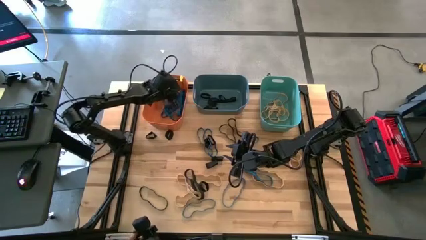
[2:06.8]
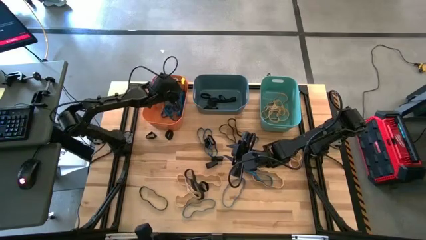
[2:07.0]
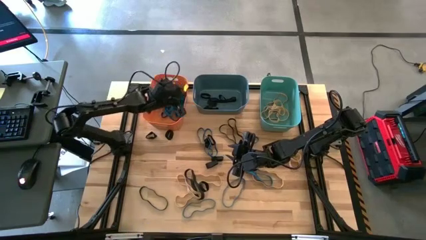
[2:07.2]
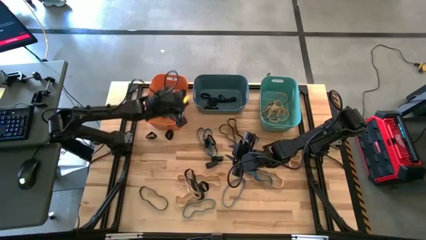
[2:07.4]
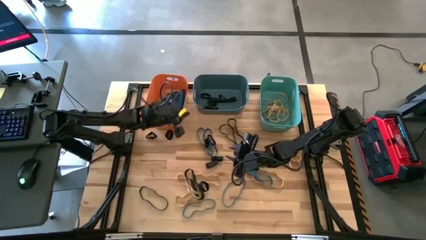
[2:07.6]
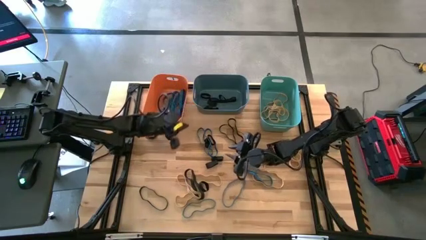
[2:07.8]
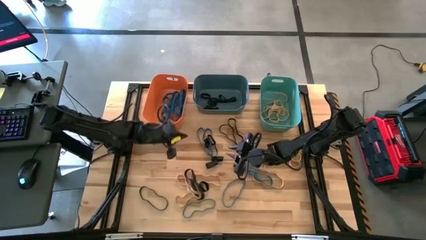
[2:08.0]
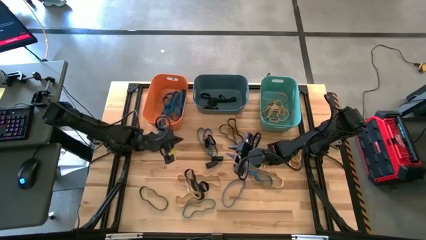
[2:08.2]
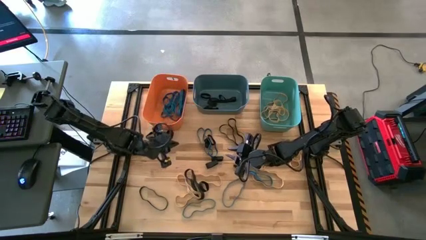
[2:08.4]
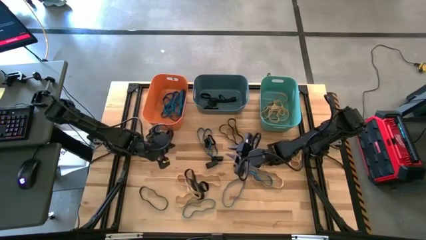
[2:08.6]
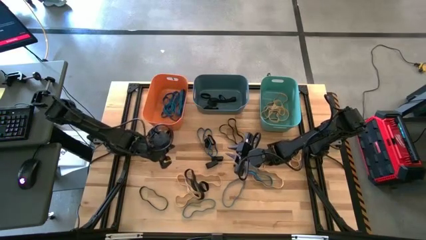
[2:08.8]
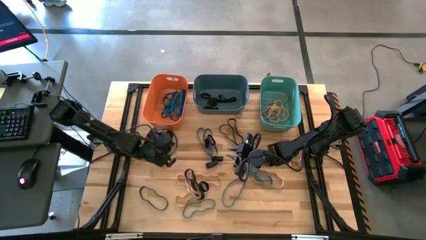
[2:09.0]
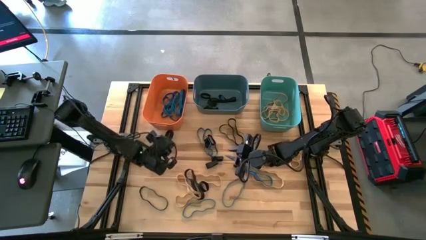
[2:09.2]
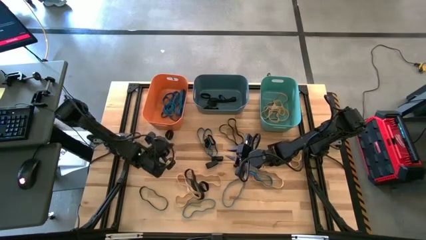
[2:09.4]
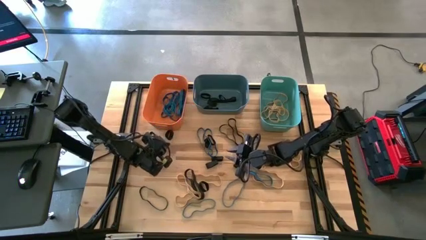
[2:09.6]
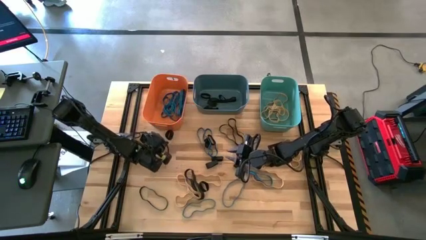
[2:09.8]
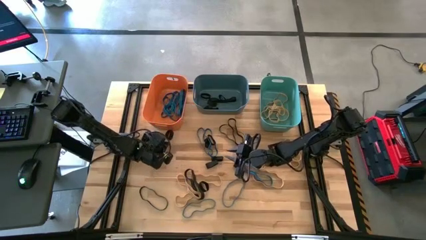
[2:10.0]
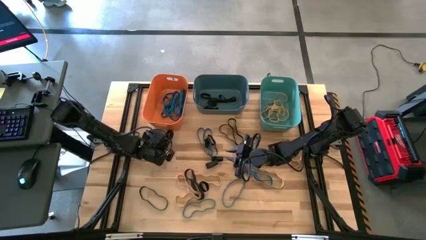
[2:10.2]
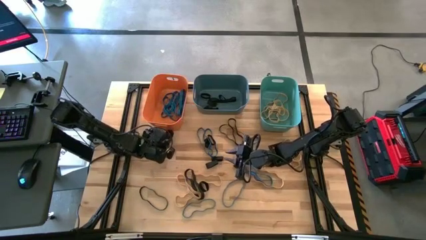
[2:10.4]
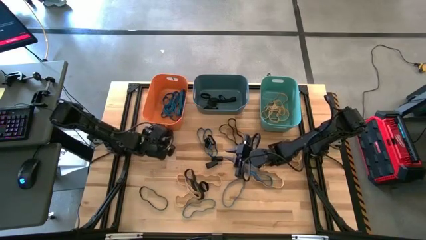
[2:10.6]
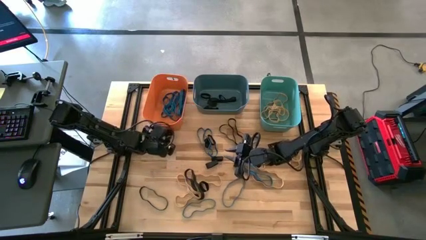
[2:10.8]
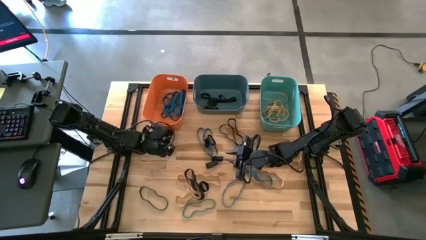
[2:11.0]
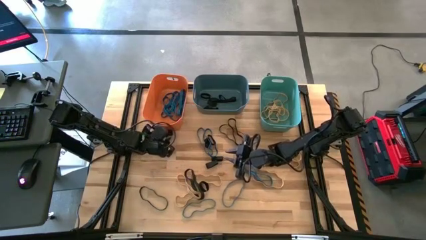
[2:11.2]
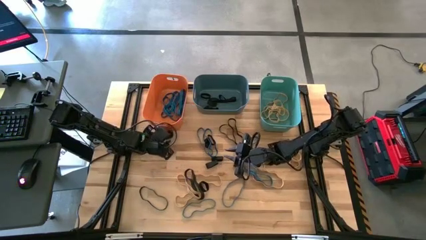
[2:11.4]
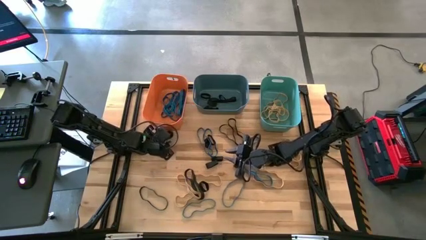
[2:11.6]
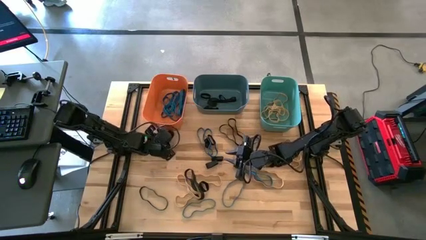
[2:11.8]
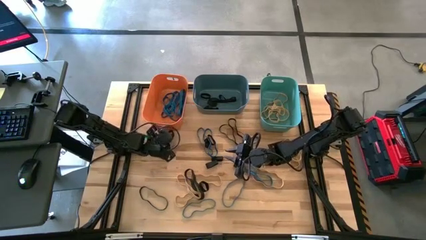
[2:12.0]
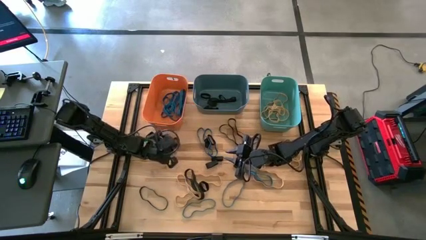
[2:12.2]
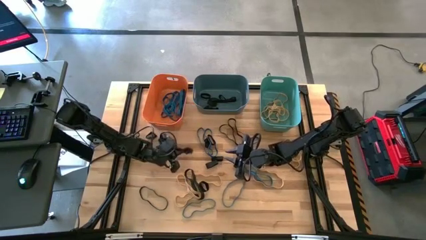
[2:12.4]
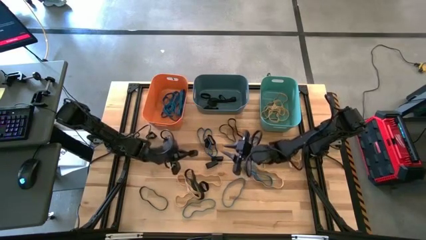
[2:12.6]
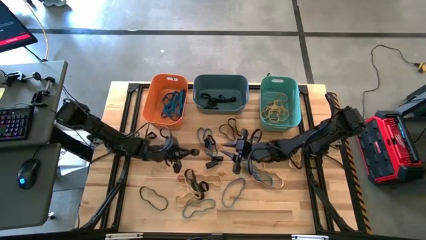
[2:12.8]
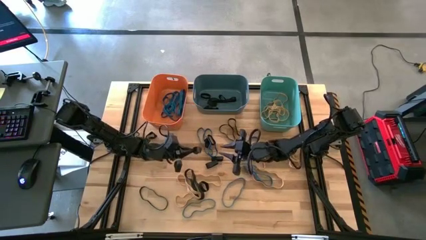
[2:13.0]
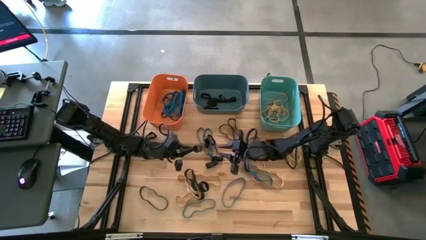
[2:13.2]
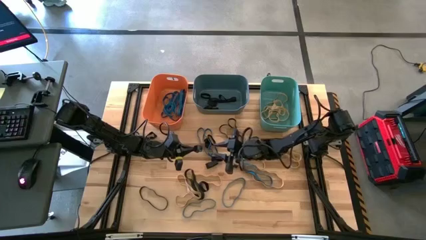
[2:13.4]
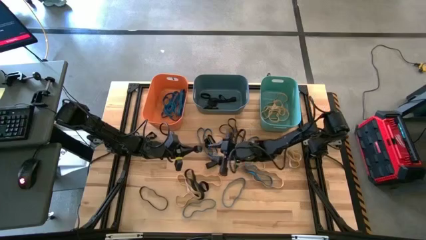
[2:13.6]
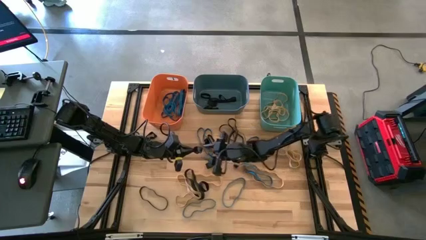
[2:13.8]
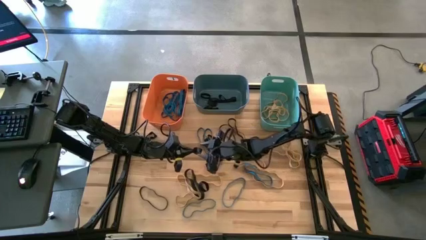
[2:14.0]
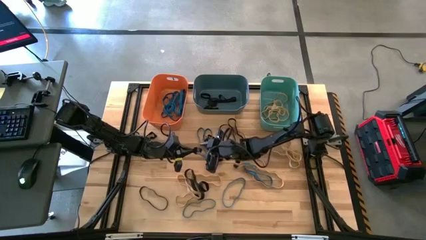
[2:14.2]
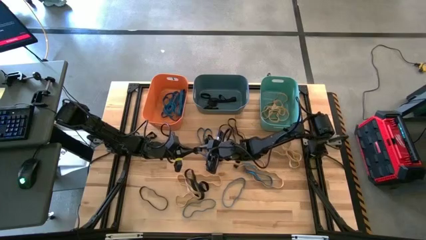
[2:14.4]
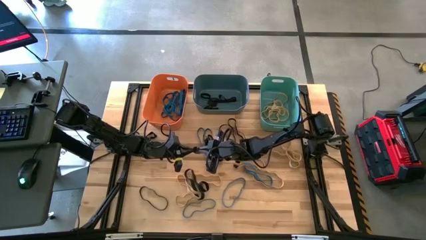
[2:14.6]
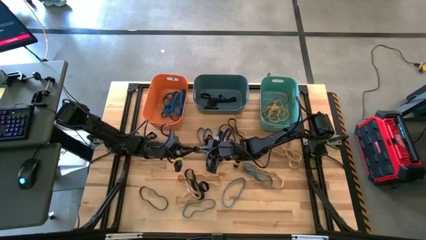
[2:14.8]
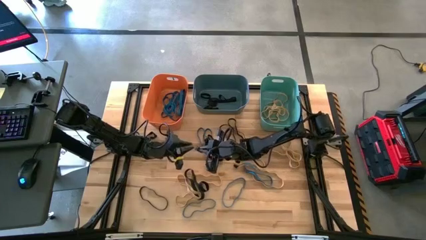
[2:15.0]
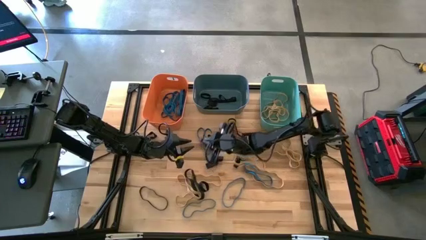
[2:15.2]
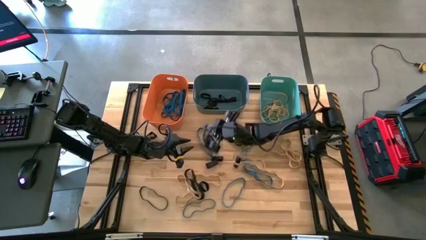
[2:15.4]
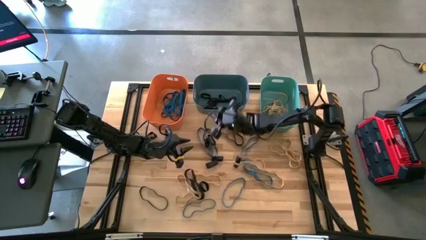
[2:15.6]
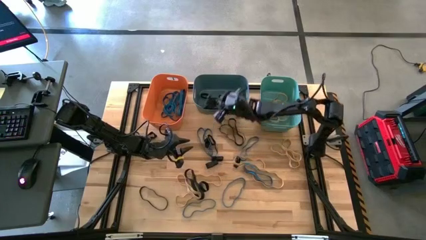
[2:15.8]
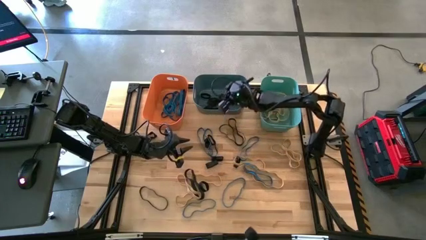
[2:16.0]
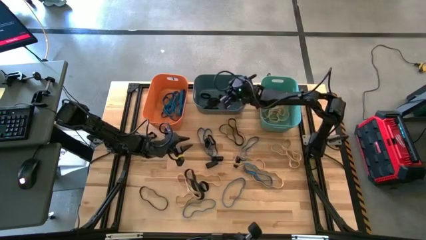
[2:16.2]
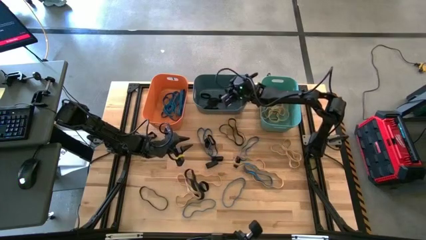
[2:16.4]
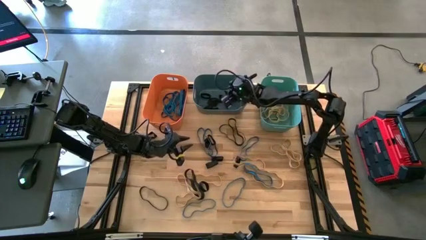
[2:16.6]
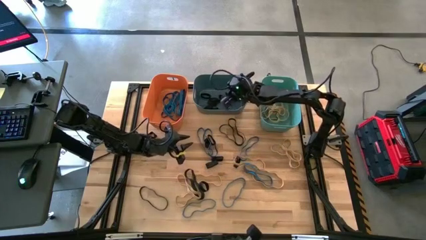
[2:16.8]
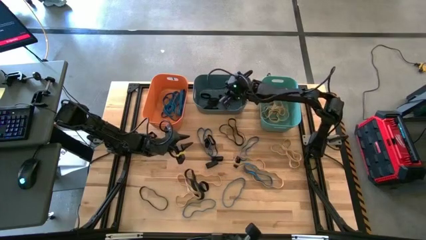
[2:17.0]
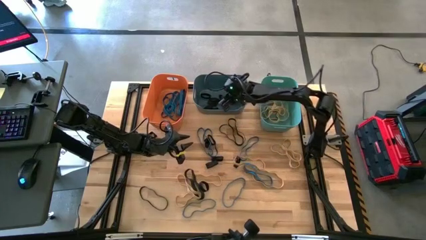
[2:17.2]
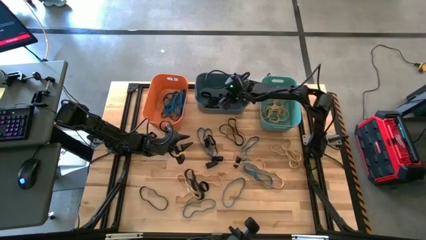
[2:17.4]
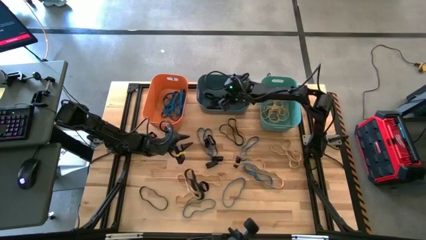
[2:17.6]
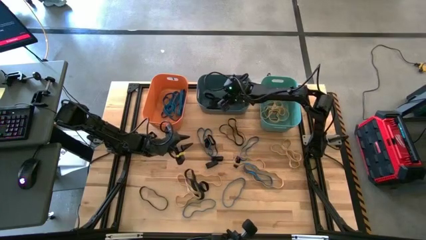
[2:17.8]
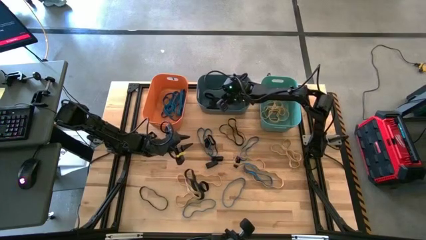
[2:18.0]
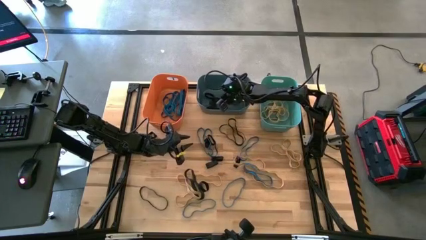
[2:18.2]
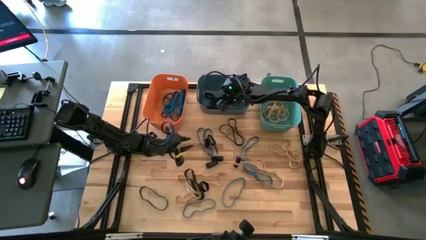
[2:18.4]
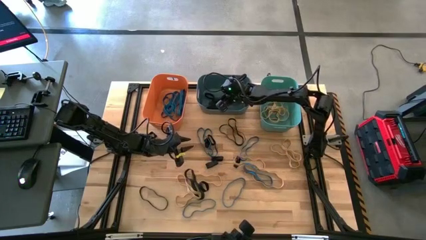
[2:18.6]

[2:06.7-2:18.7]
Task: Sort rubber bands into baskets
Put the black rubber band into the blue bin

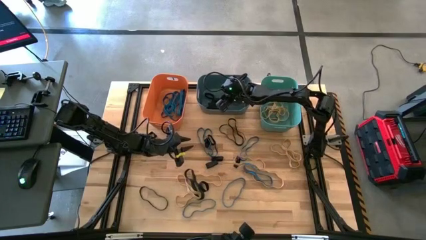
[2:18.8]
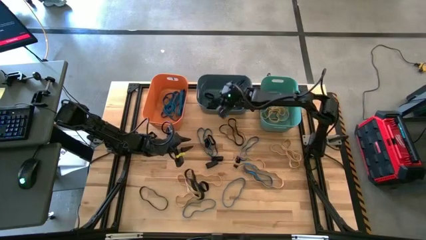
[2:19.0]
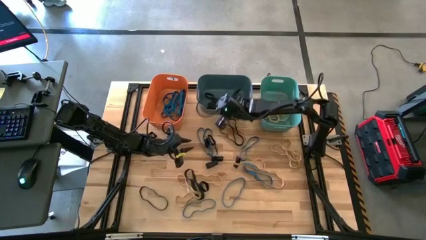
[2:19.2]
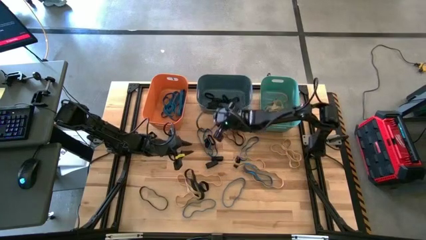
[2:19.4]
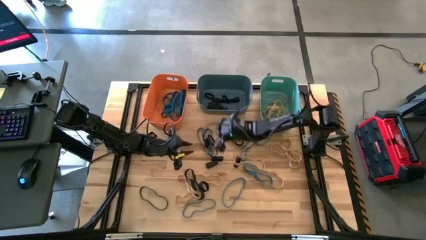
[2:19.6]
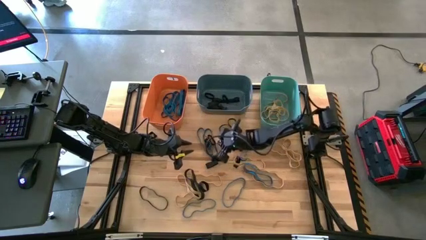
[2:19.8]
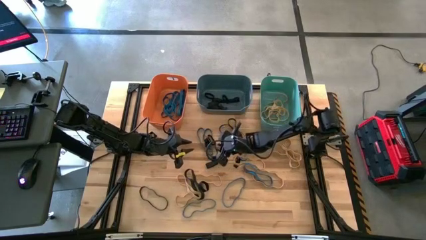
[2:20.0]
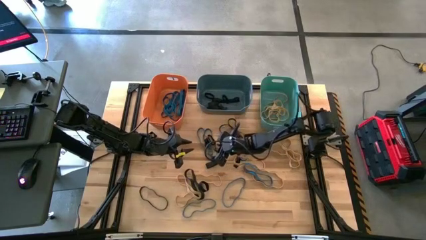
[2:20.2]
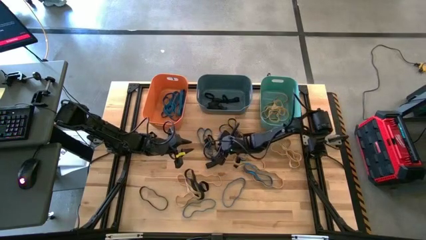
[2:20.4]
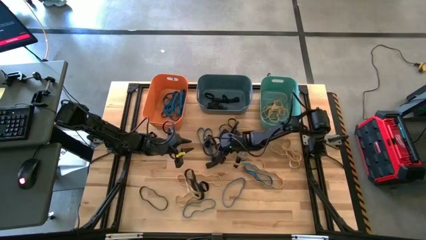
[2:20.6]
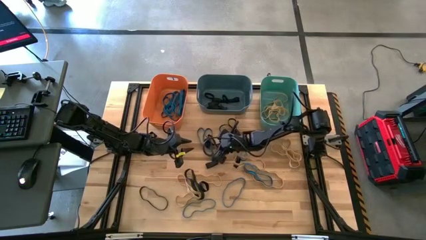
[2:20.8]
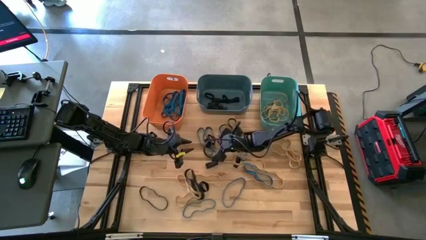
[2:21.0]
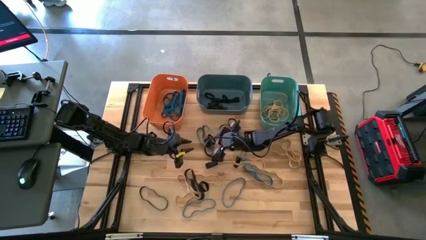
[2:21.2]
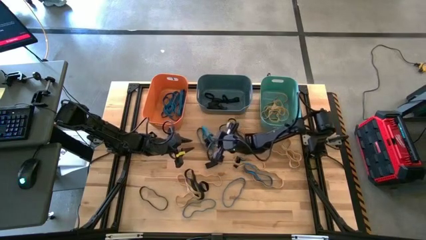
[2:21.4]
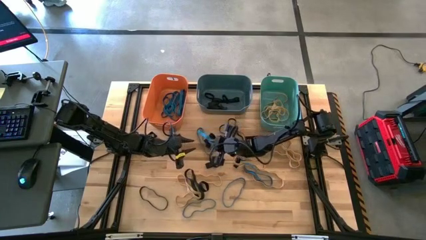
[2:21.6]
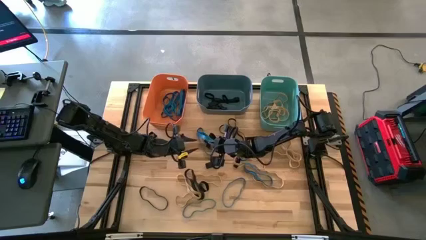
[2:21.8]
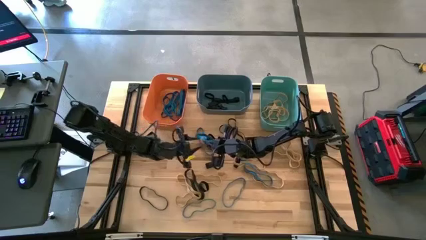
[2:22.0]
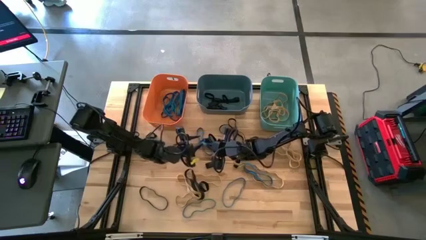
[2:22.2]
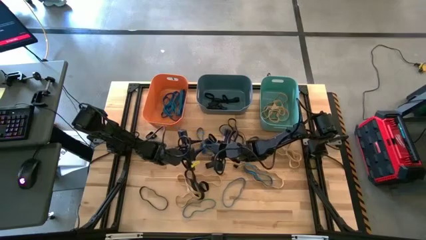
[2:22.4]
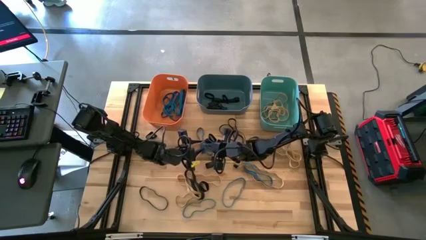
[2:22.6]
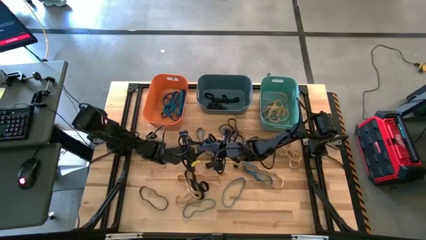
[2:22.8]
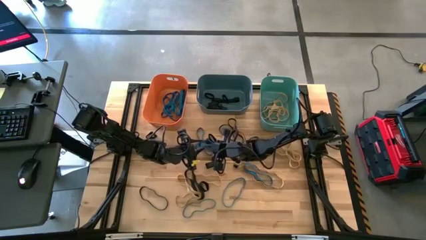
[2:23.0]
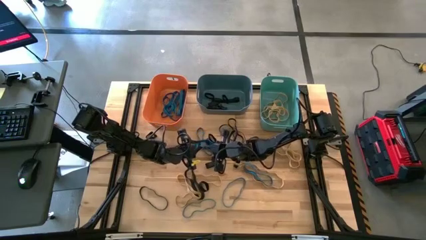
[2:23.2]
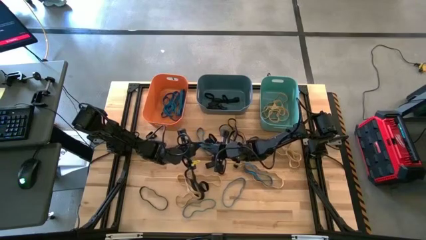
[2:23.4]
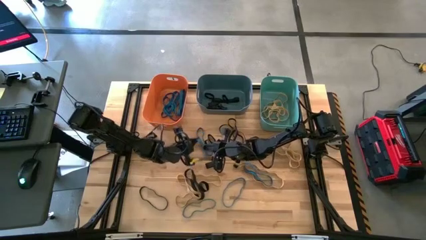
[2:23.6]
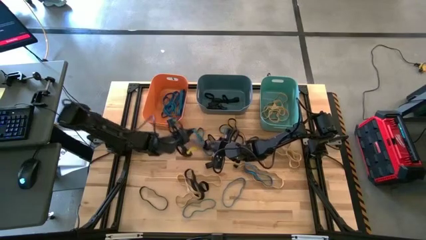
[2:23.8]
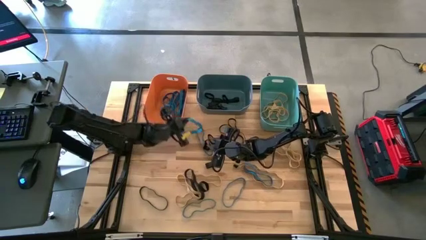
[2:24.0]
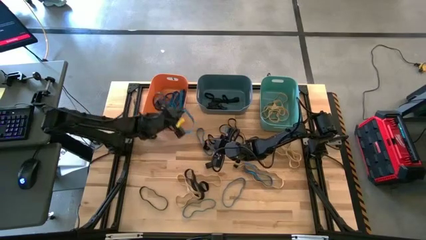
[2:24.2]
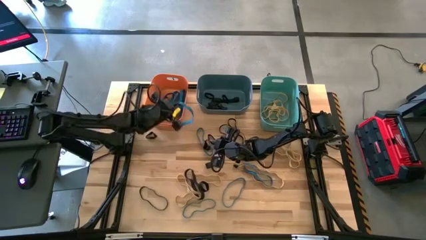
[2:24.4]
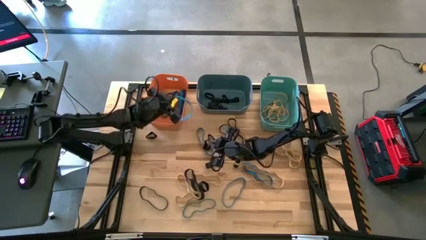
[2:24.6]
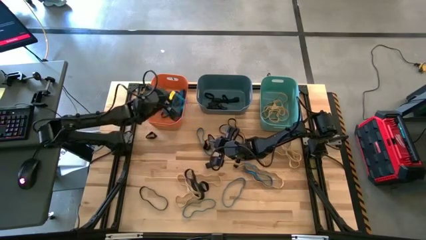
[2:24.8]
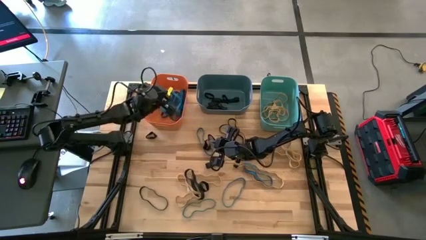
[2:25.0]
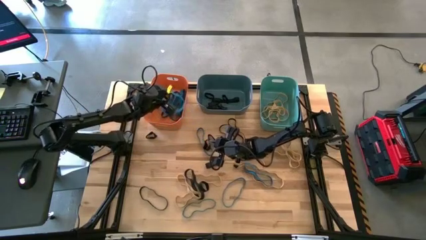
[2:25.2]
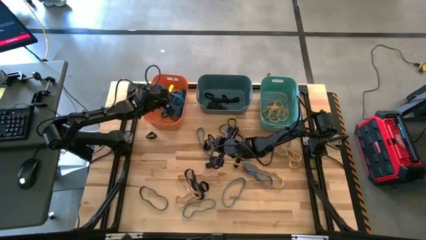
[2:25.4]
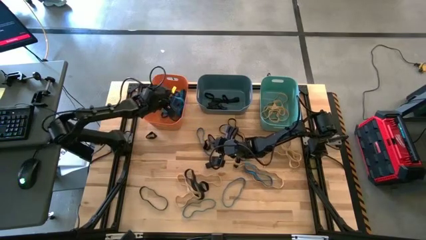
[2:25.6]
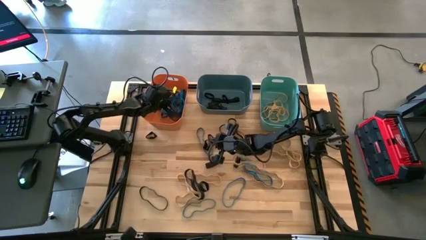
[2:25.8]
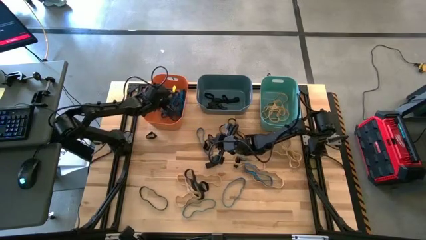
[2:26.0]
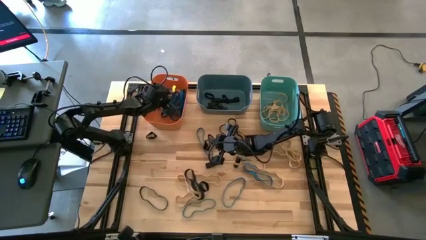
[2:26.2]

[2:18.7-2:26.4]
Put the blue rubber band into the orange bin
